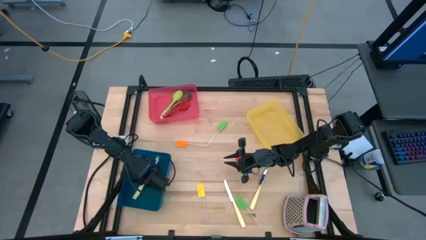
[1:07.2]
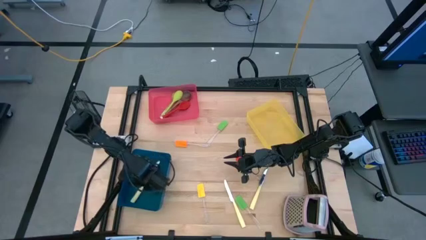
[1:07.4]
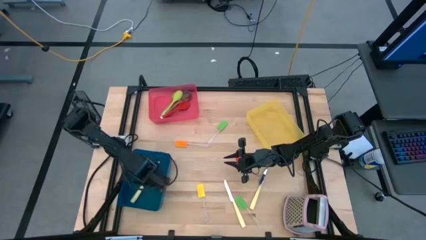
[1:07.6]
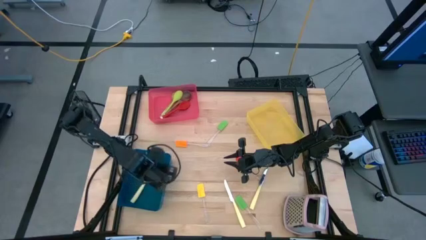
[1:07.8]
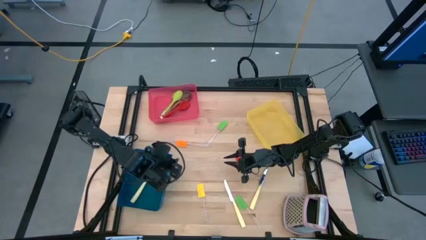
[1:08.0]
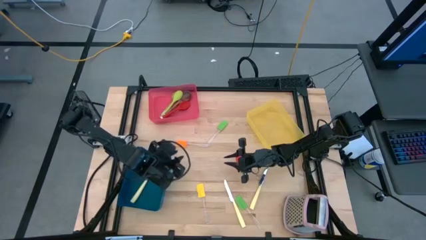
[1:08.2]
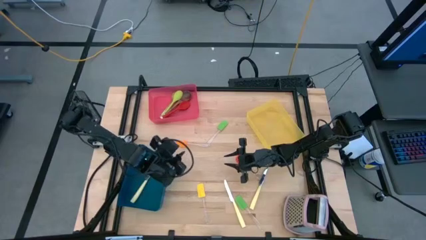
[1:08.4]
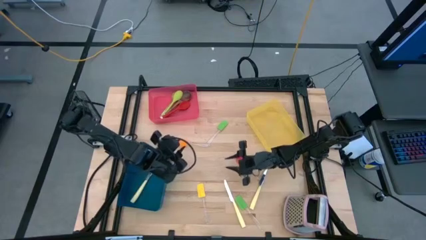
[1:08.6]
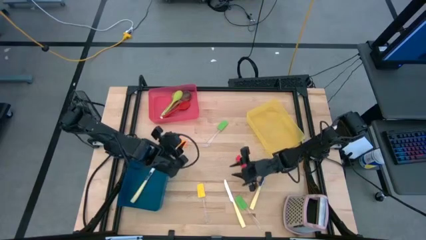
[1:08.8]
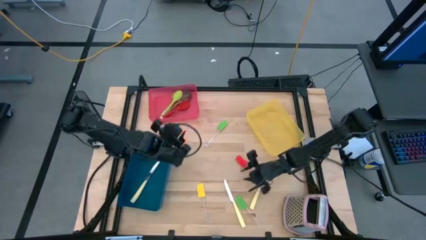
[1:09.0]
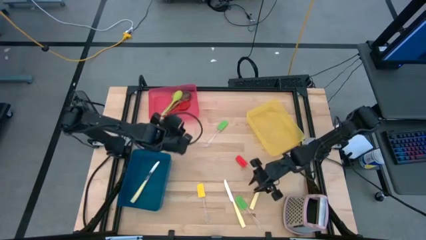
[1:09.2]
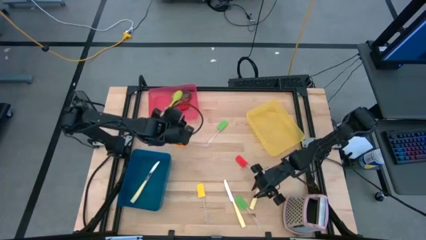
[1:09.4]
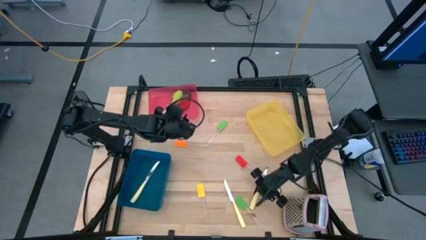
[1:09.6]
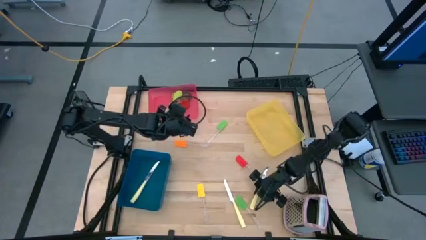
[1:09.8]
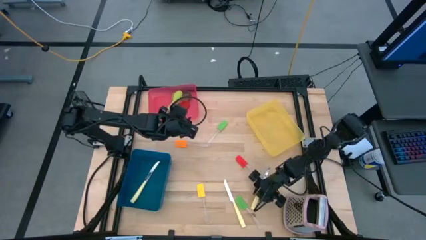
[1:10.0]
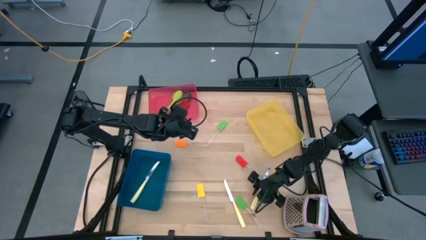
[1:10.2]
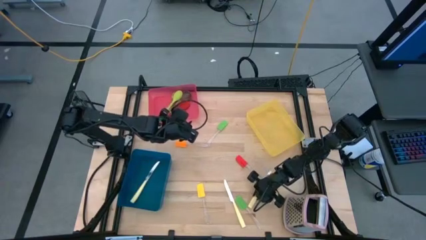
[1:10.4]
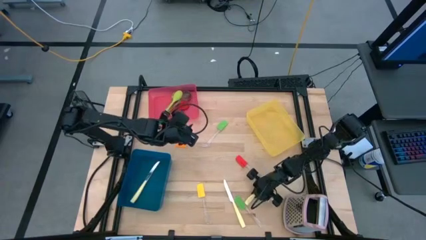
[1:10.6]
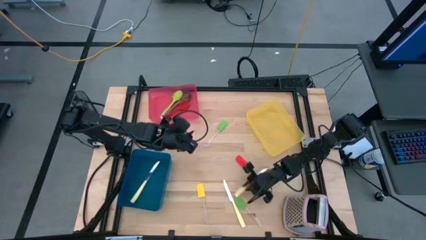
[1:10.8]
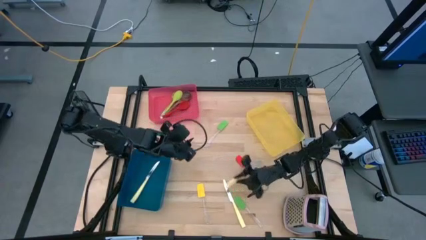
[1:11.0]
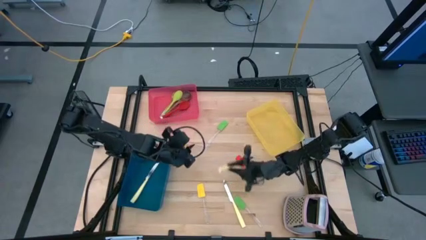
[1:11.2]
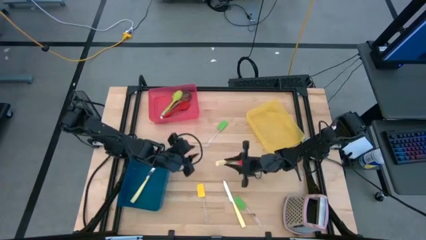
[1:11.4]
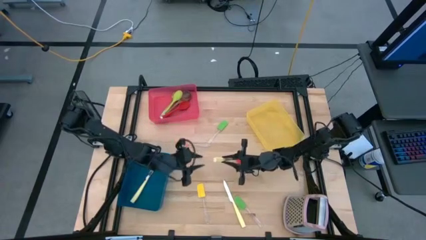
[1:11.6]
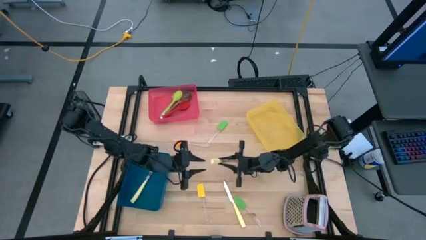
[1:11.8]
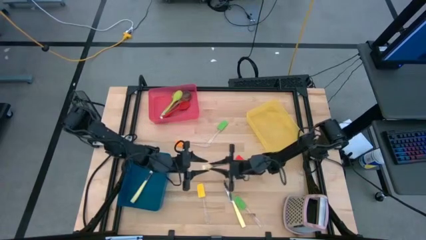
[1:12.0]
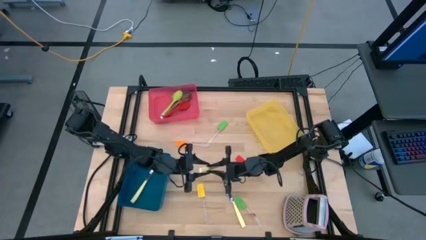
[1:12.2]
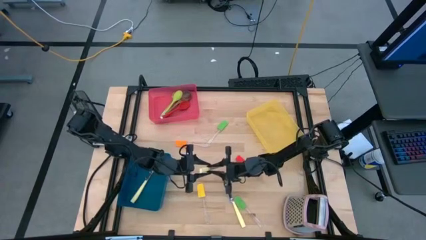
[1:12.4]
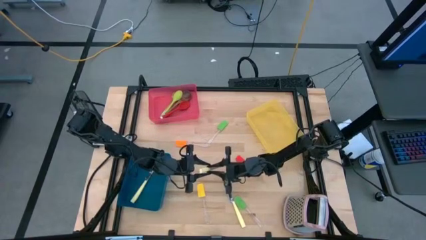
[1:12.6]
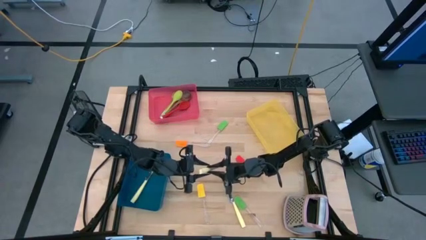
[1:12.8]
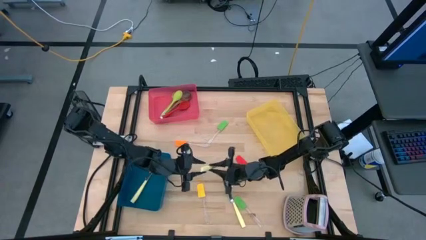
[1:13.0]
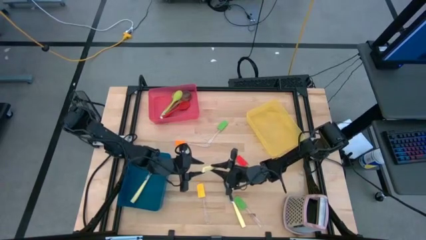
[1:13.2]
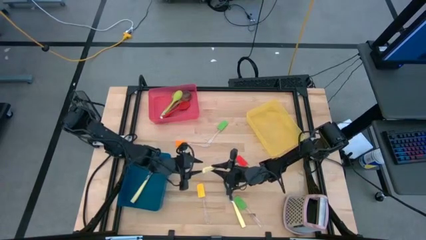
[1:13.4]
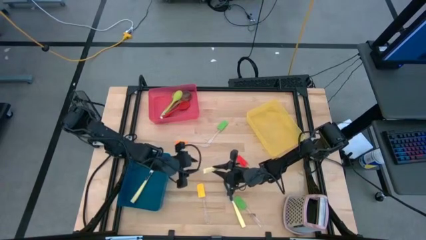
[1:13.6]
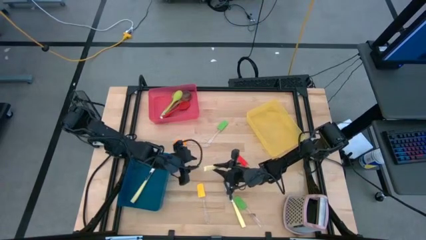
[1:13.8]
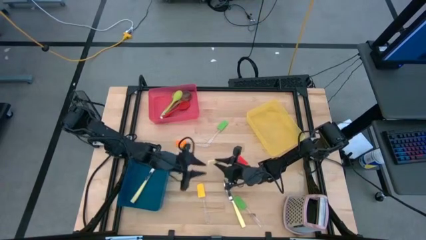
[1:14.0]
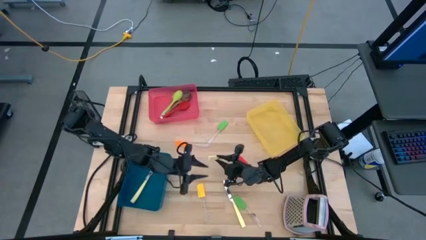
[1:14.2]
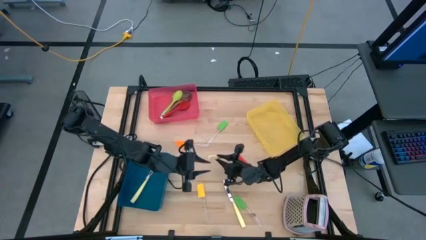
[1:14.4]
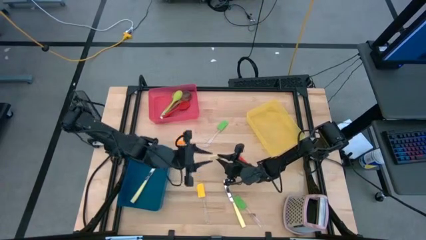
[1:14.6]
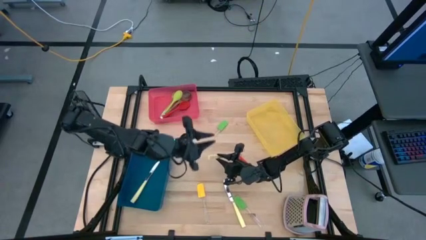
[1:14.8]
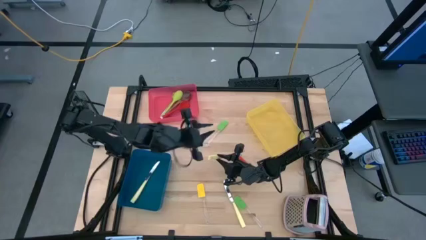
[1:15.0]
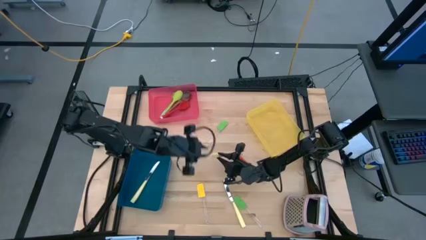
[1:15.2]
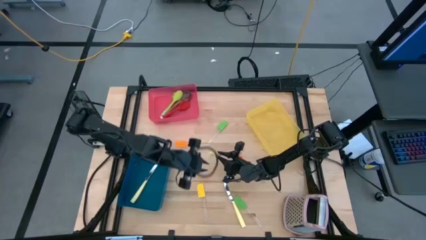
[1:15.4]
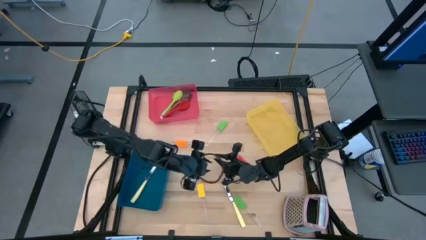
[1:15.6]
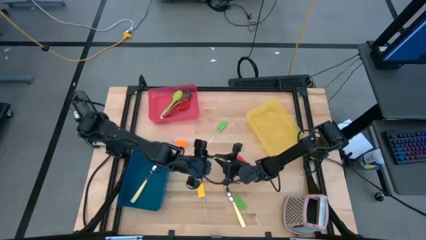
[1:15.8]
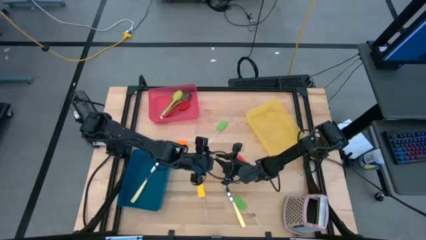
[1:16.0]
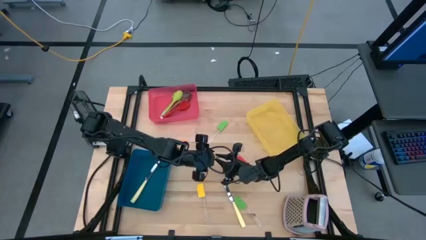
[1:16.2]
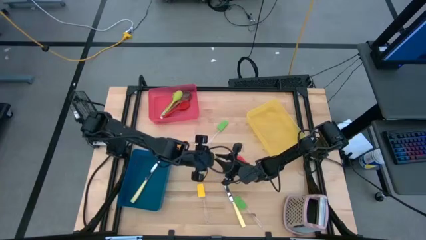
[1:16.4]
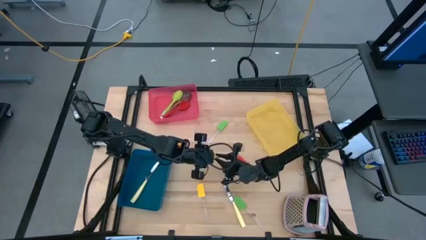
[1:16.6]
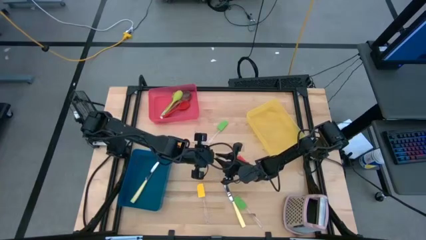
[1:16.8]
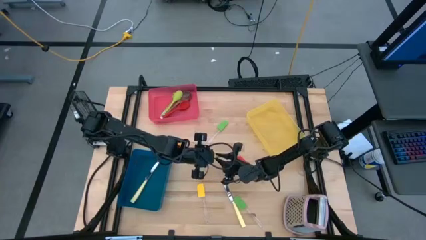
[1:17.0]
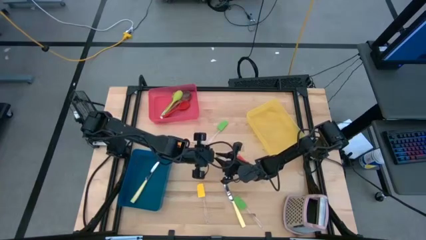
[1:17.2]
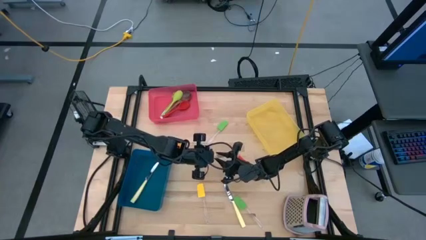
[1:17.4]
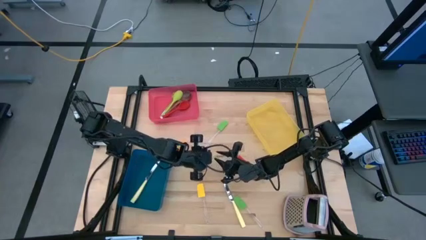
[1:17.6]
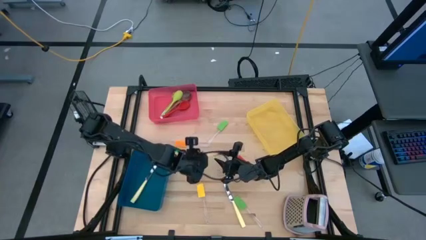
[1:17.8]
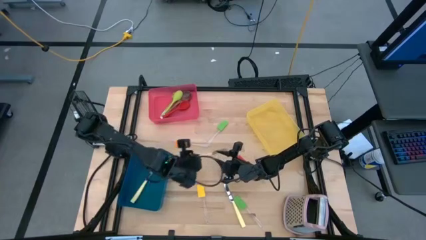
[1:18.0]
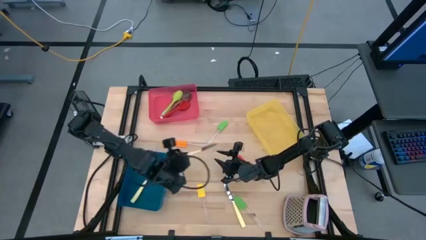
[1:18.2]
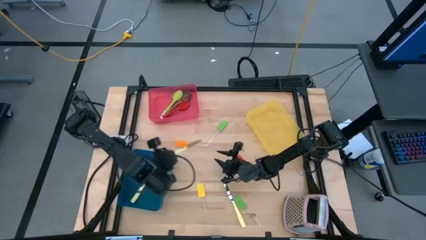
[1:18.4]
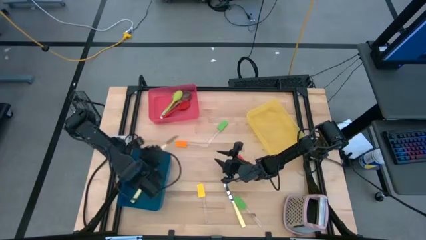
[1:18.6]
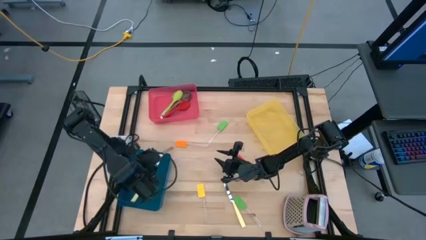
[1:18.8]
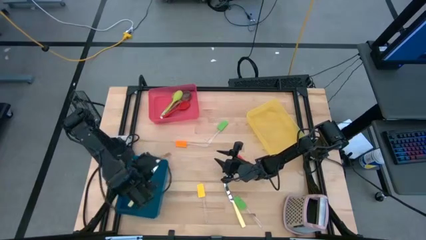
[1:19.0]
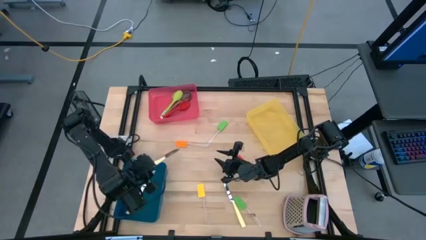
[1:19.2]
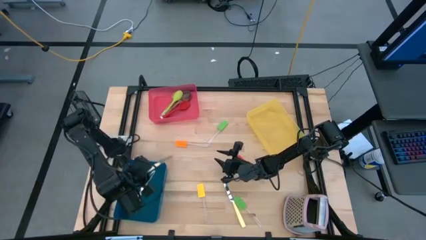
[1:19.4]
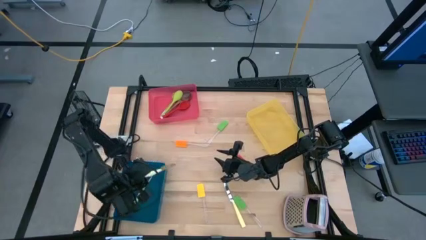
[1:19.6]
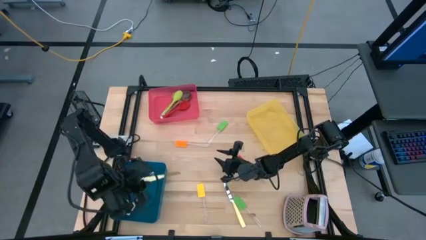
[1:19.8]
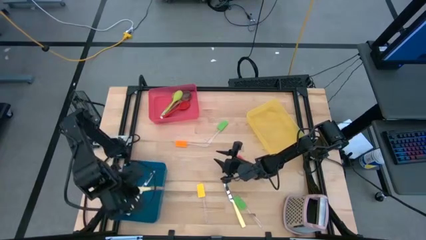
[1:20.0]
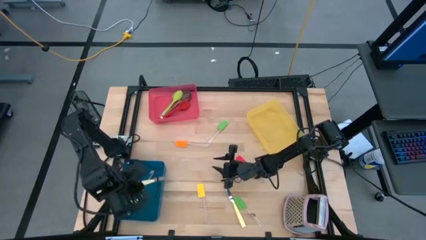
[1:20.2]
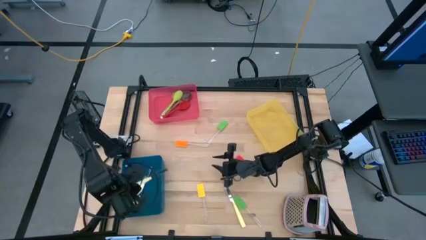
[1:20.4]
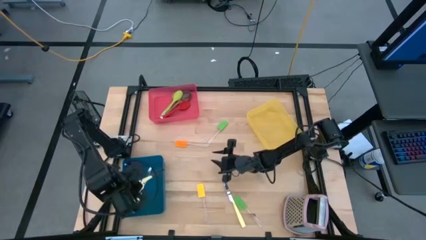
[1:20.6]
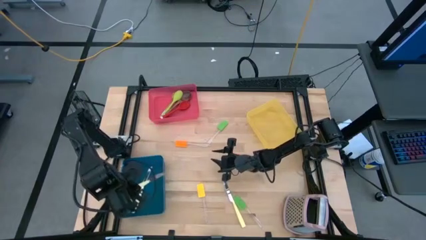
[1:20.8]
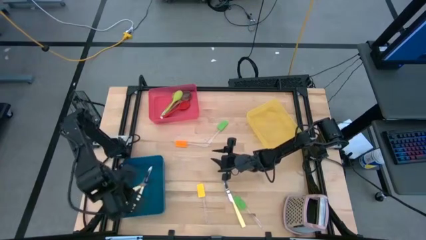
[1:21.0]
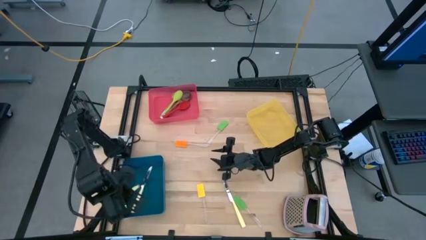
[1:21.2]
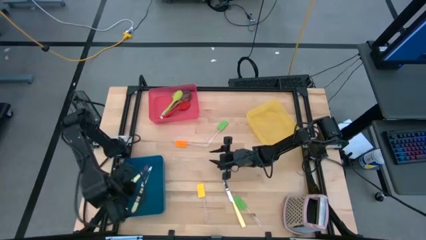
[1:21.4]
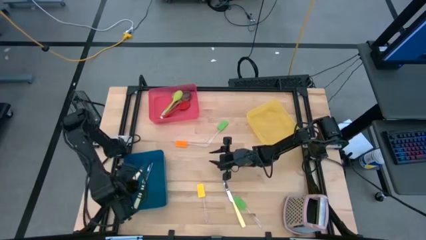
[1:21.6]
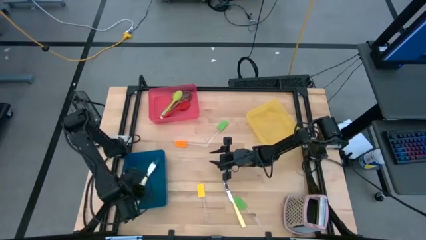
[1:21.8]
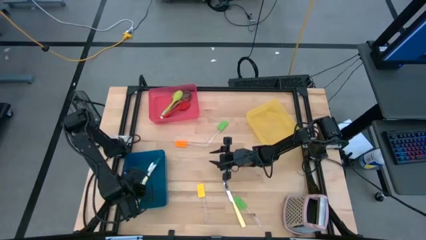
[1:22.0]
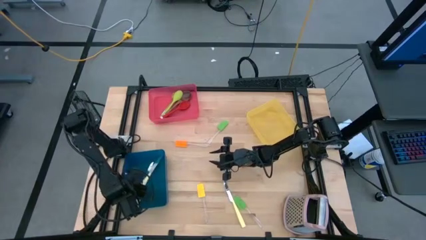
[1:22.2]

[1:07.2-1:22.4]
Task: Pick & Place Kitchen Items
Put the right kitchen knife into the blue bin
